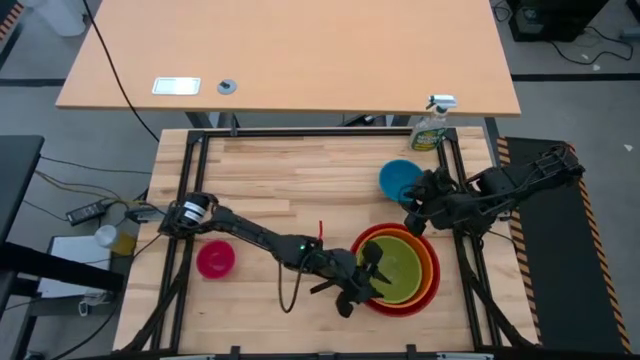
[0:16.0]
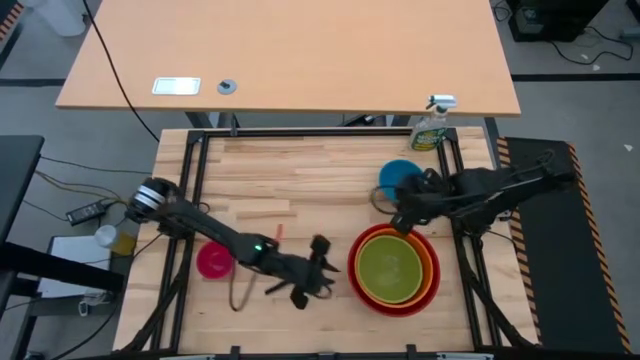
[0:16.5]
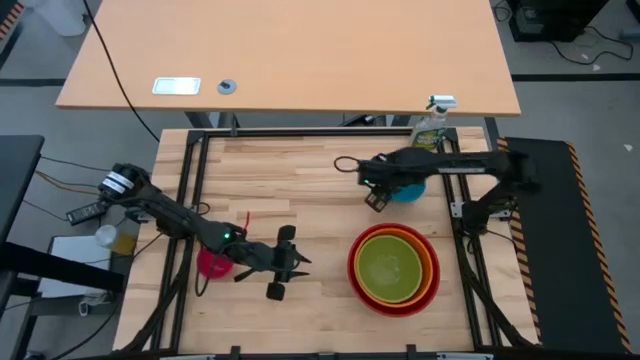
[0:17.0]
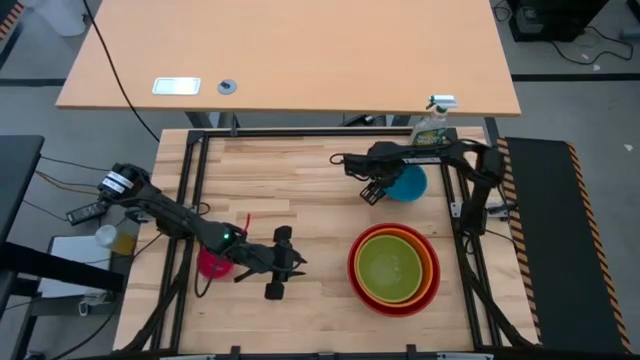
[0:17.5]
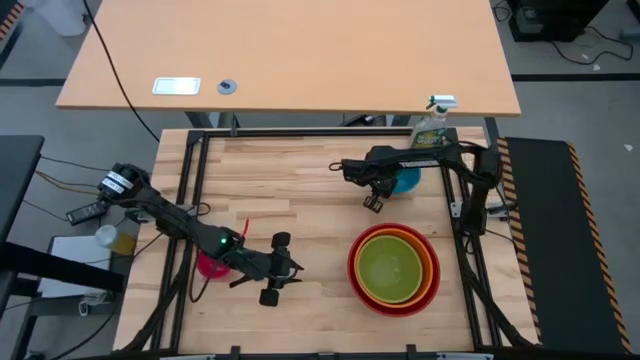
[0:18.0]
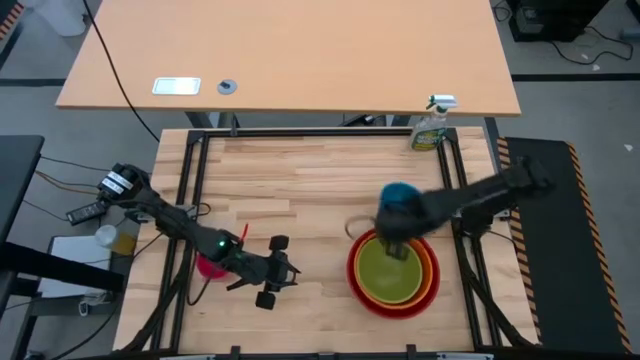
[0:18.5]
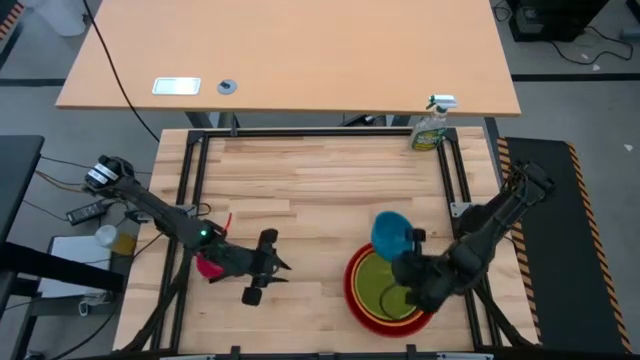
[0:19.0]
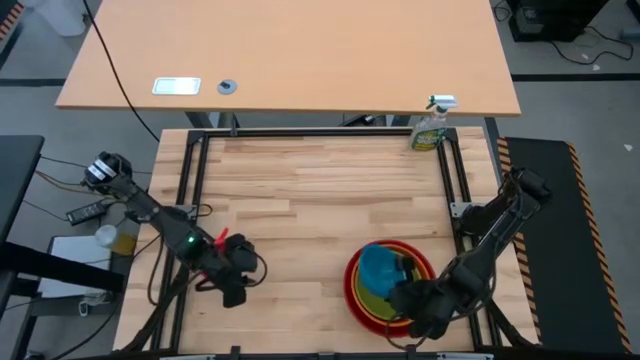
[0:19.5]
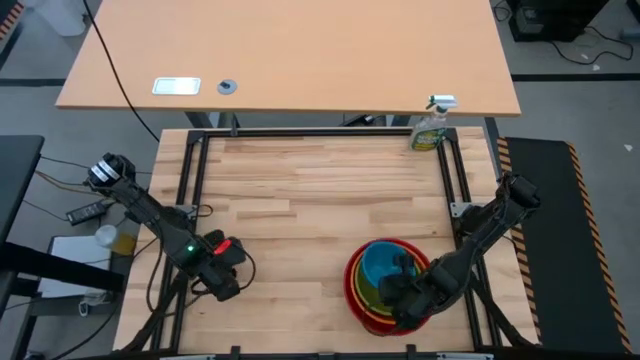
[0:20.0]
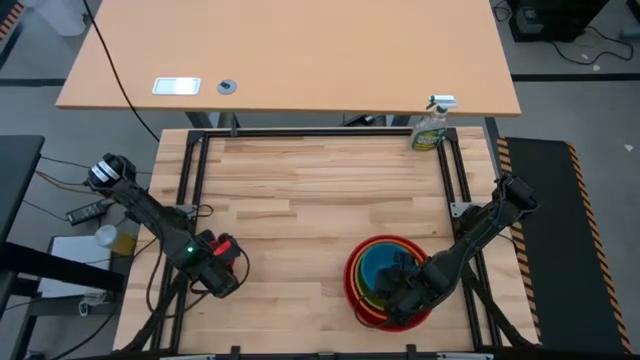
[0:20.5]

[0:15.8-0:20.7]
Stack the blue bowl on top of the green bowl

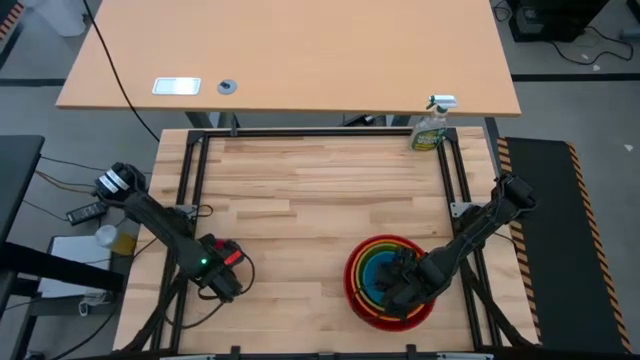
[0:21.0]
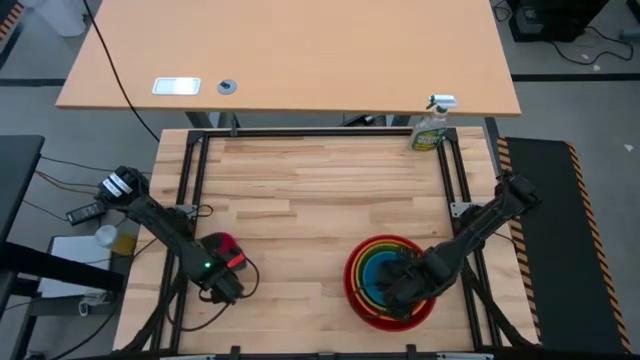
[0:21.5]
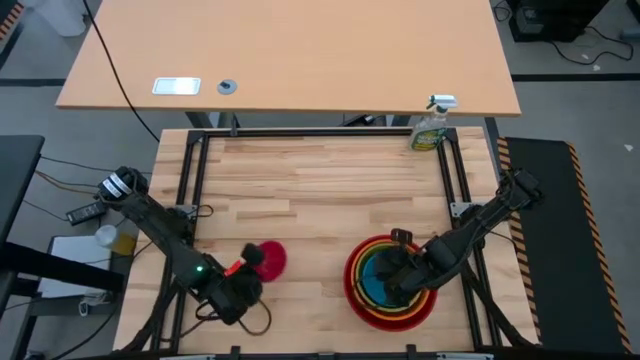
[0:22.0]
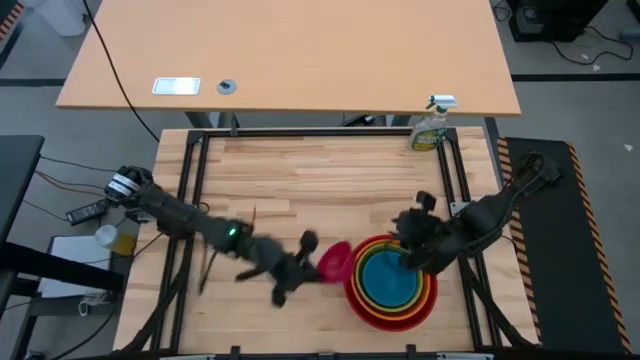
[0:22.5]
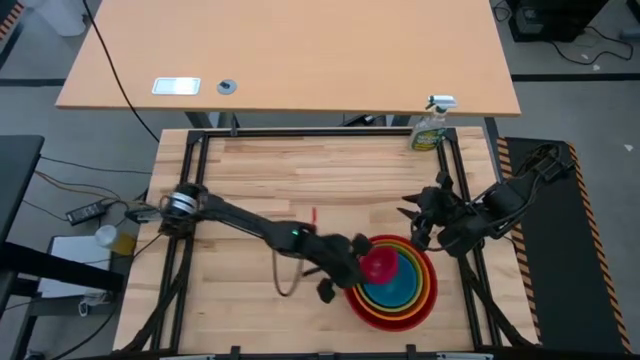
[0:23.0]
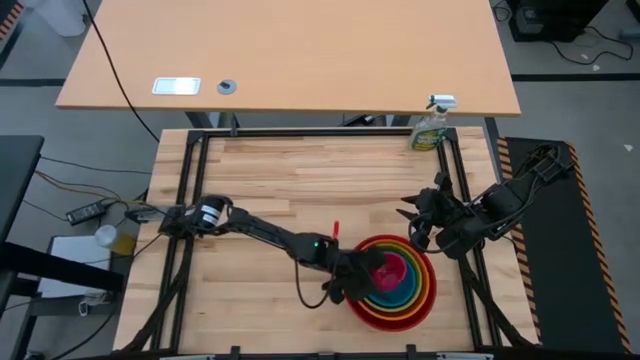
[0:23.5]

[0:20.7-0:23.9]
Stack the pink bowl on top of the blue bowl

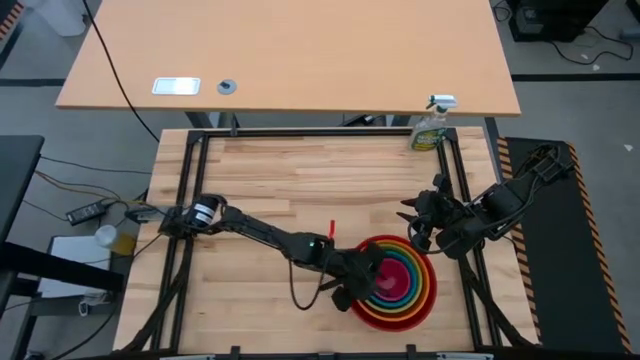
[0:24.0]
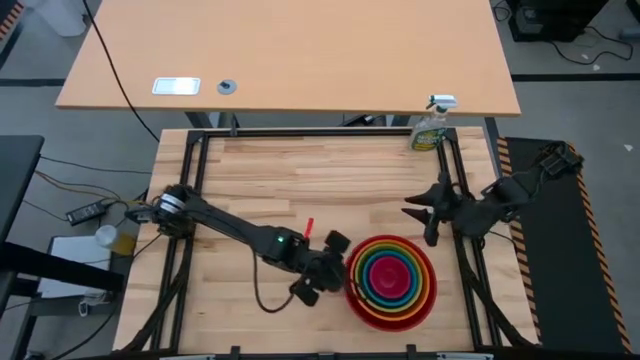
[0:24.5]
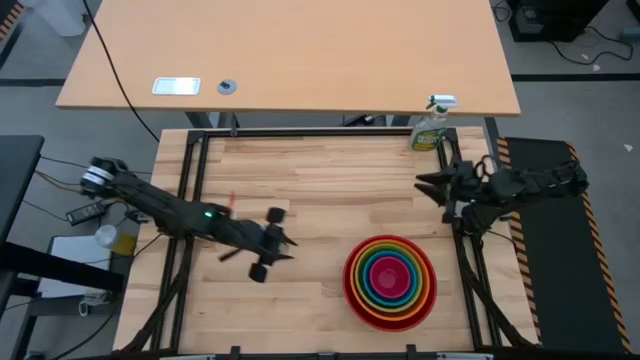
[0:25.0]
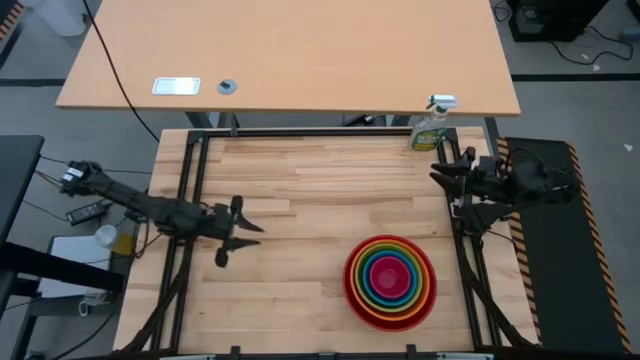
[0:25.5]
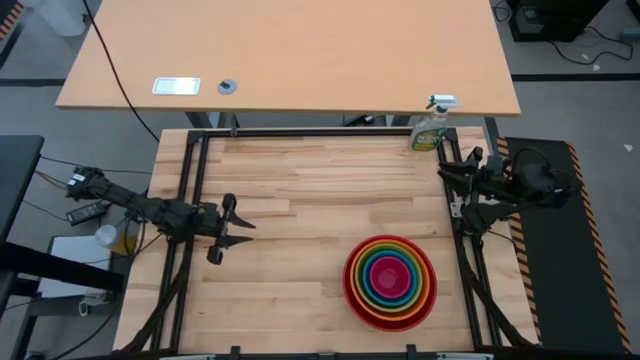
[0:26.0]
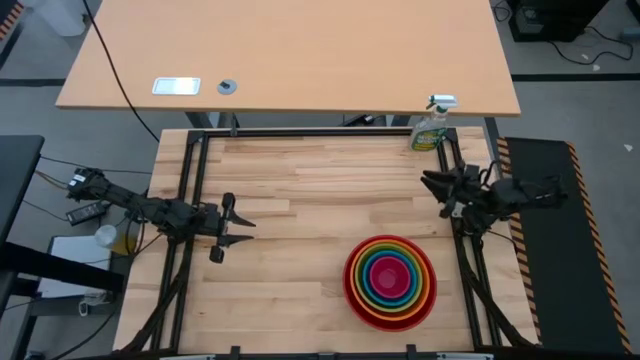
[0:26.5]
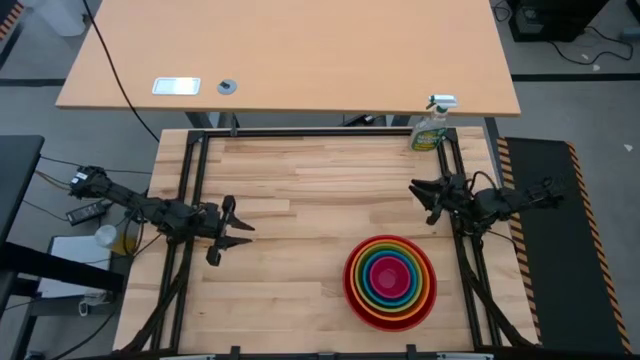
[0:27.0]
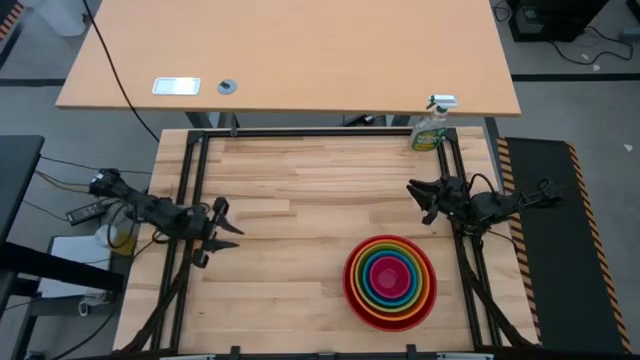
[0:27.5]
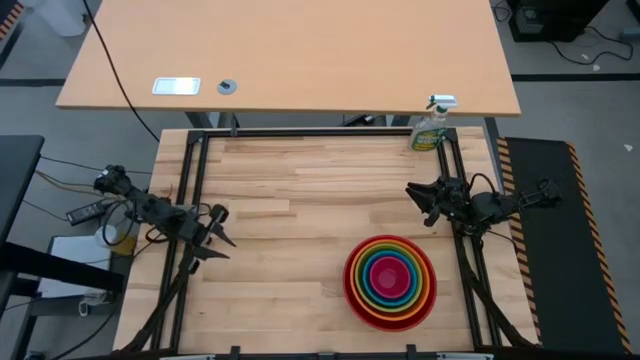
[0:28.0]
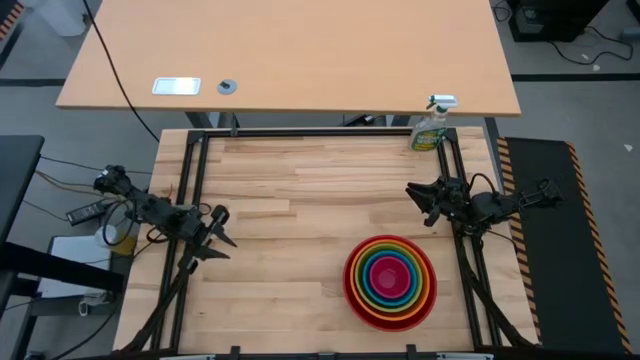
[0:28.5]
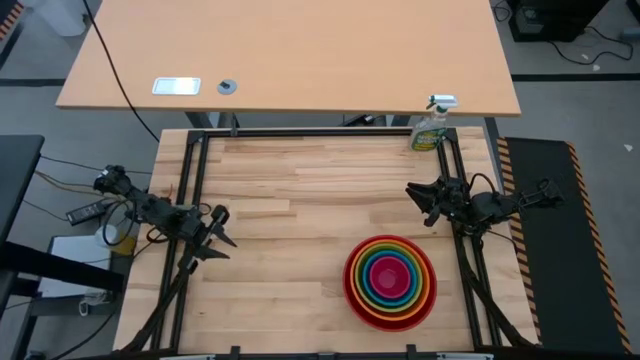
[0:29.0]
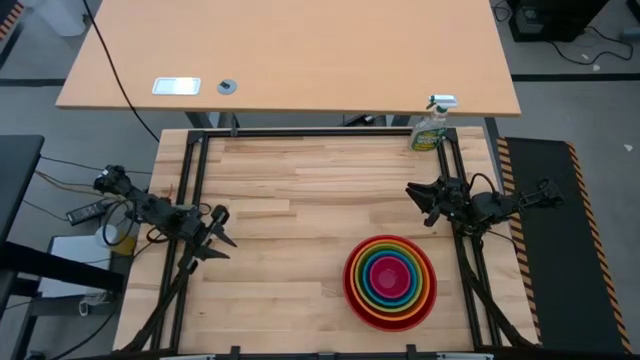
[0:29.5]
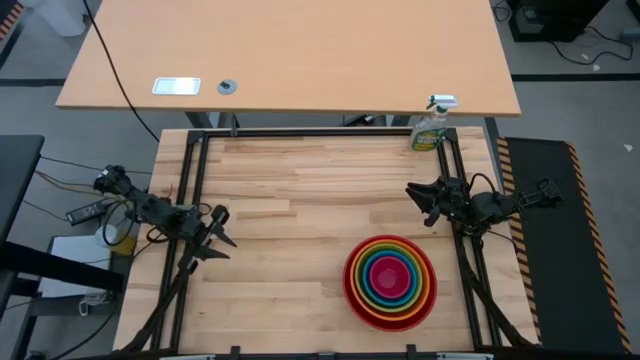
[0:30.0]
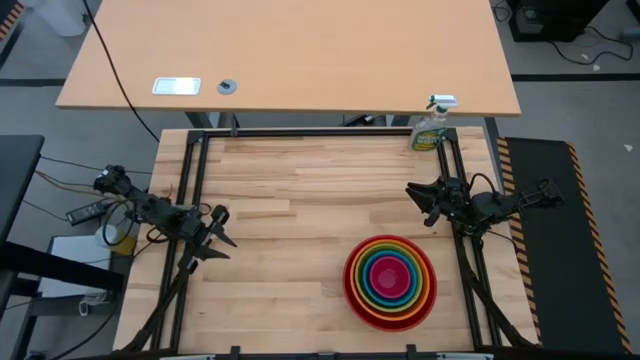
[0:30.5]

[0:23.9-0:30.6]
Return to Home Position

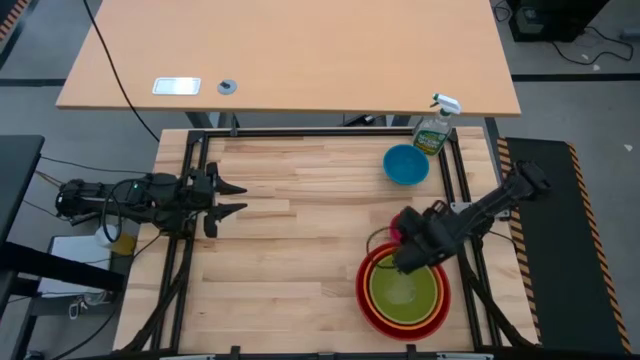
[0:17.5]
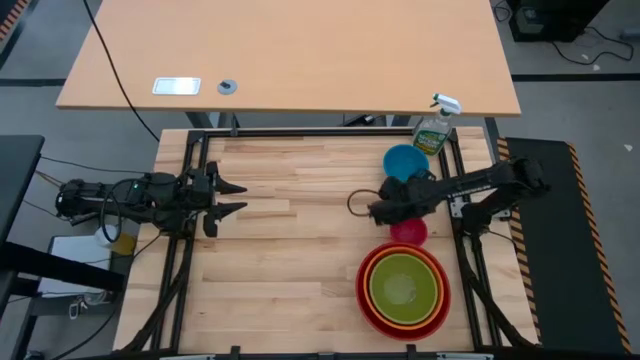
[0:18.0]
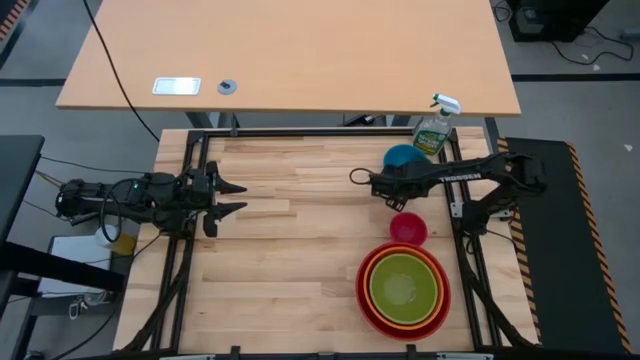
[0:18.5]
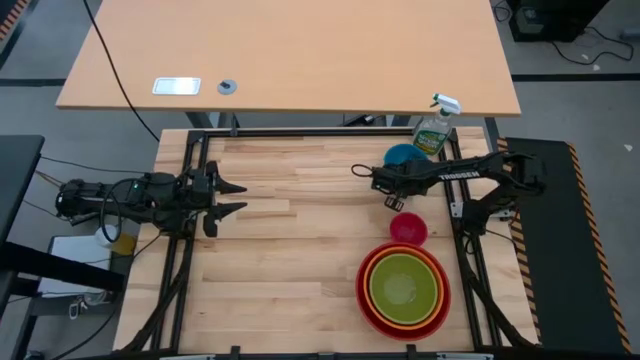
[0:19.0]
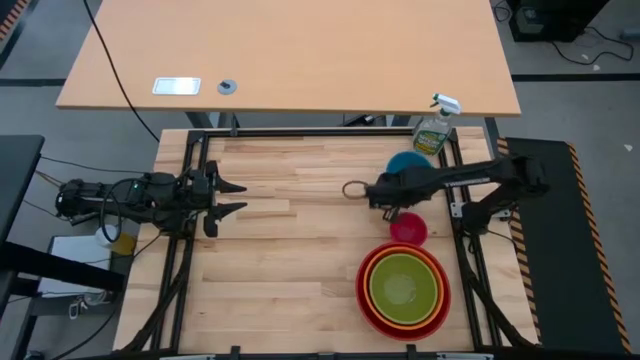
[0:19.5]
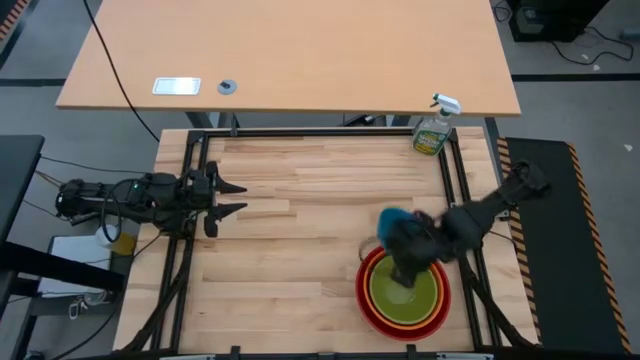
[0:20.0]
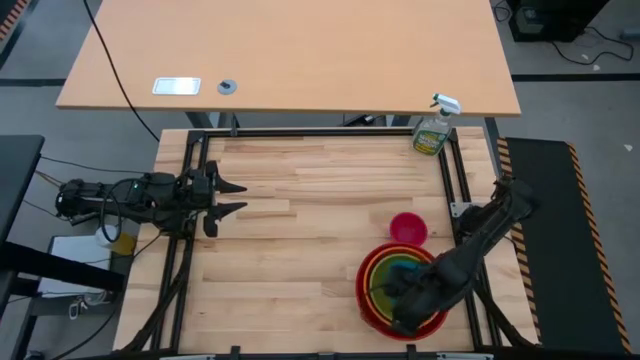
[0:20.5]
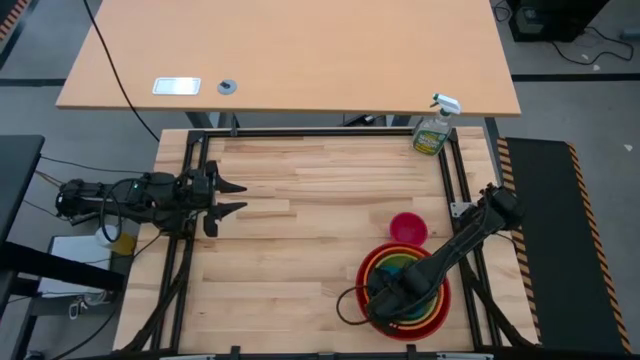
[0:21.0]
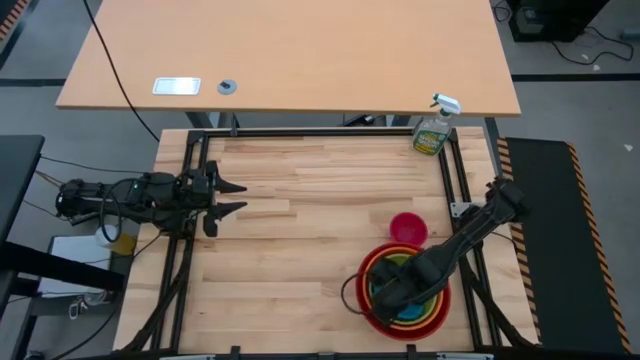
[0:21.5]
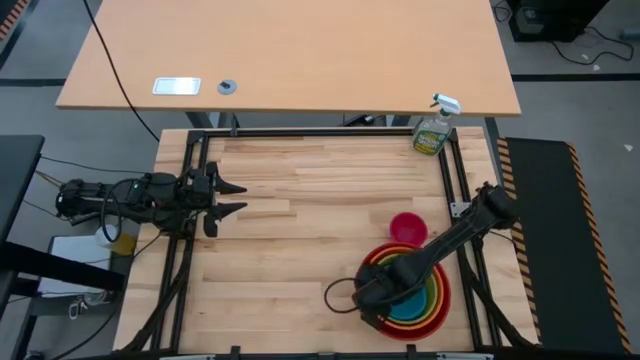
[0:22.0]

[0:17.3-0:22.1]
Stack the blue bowl on the green bowl
